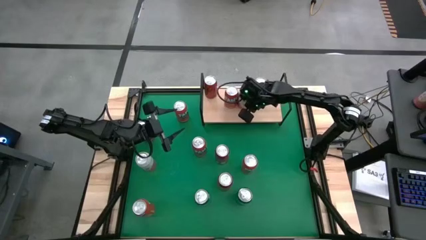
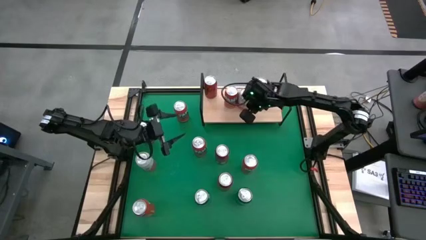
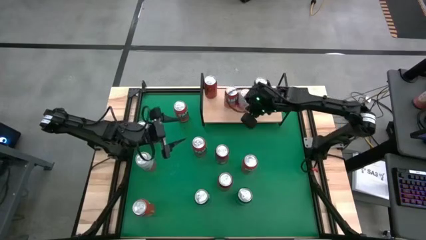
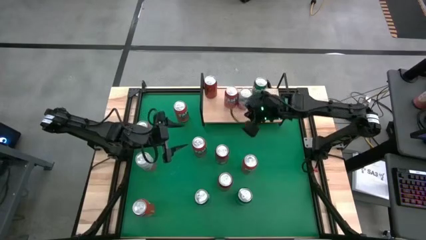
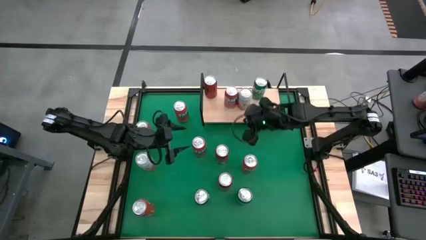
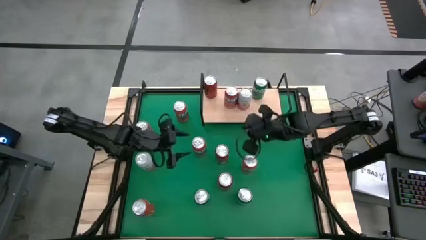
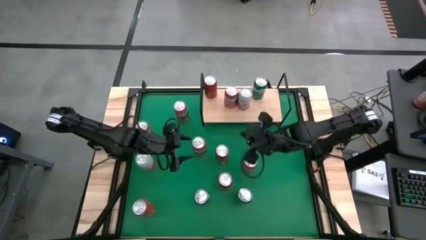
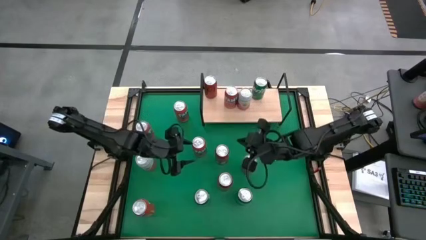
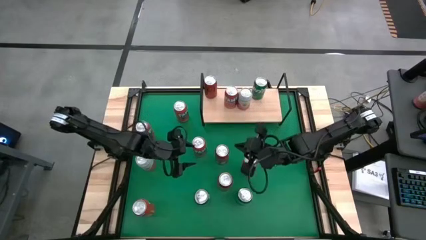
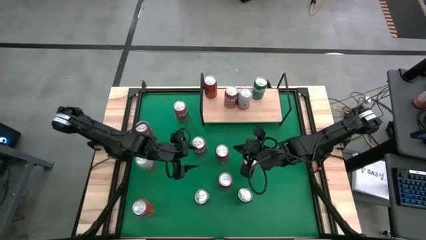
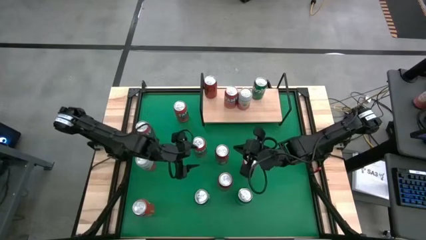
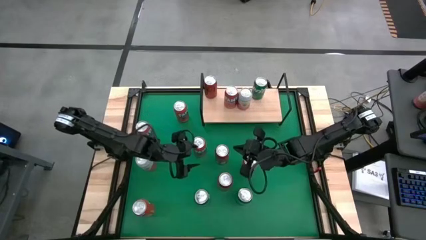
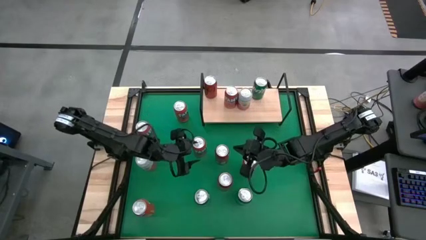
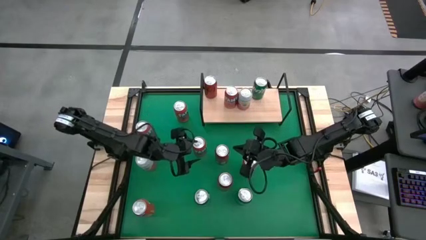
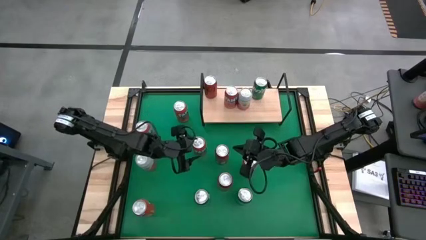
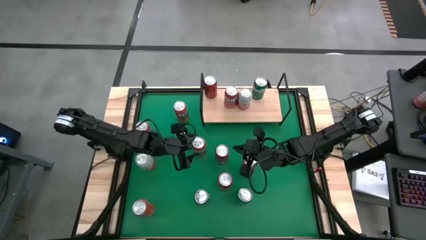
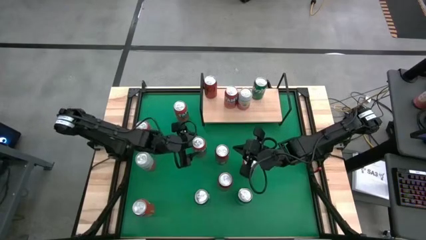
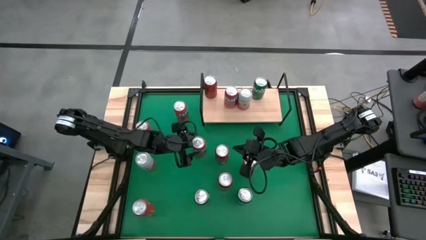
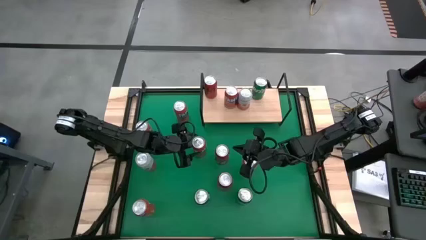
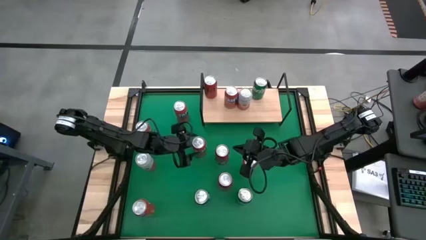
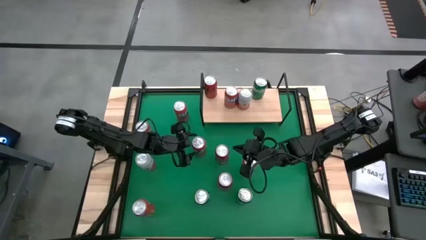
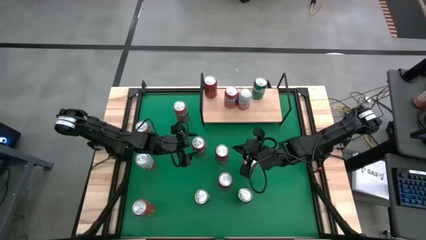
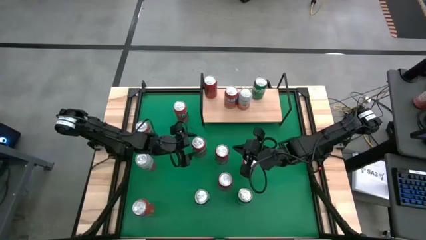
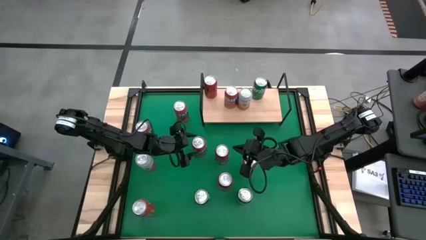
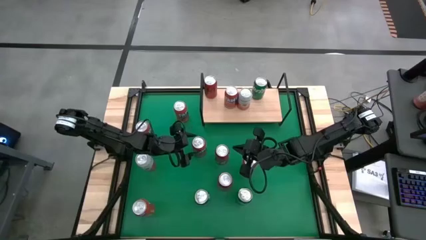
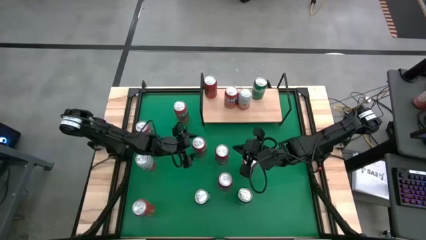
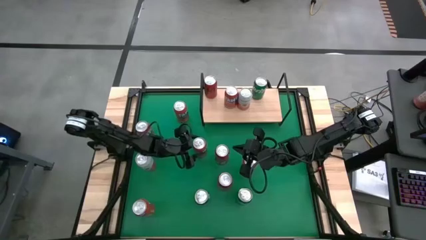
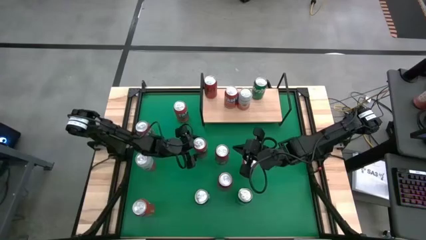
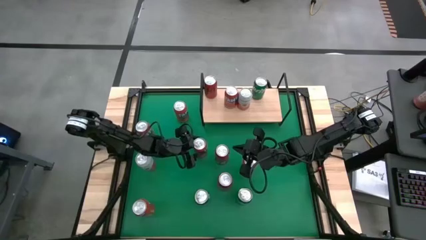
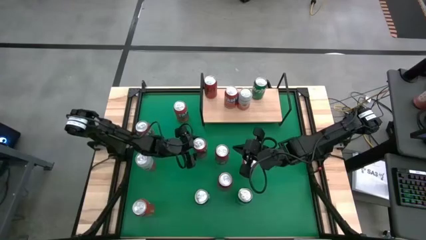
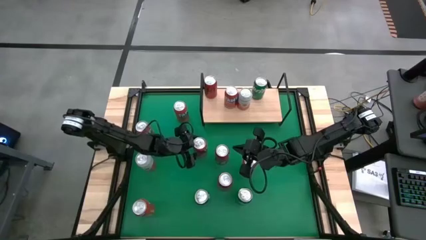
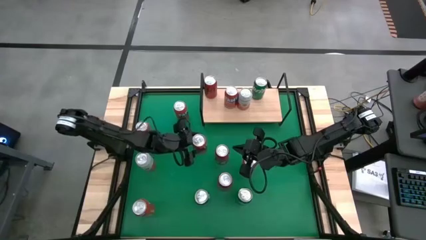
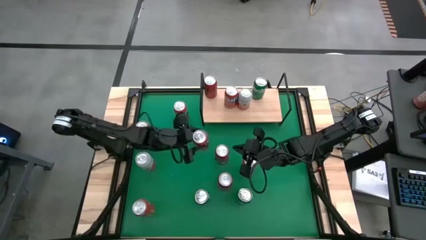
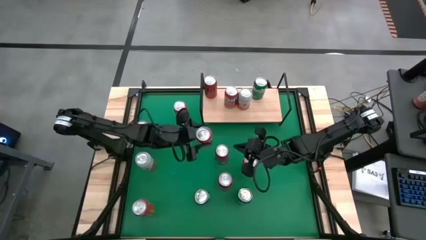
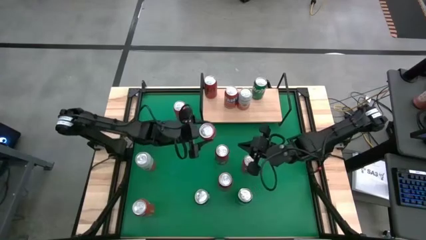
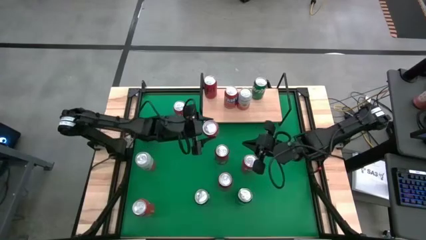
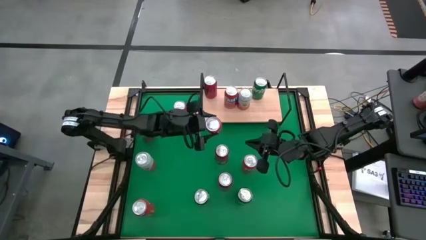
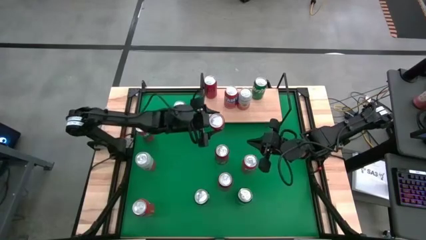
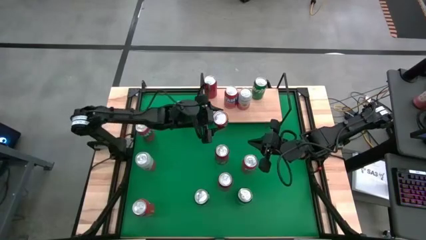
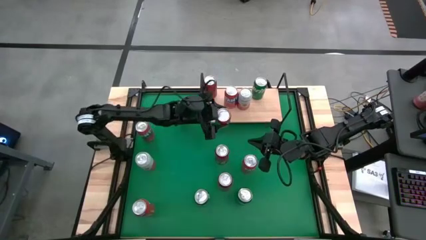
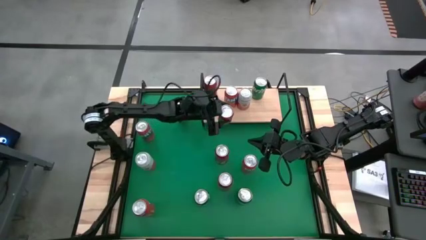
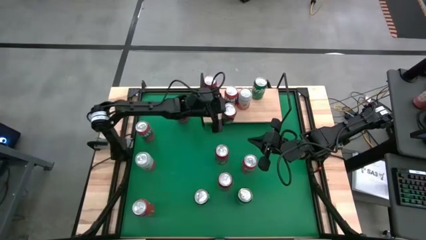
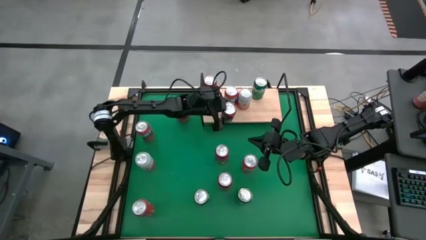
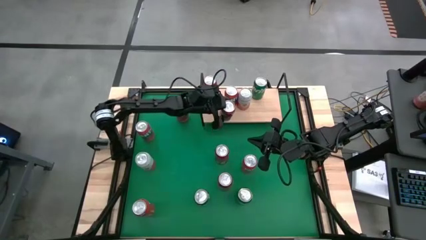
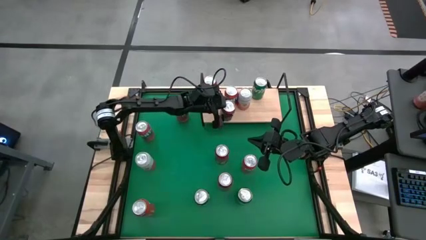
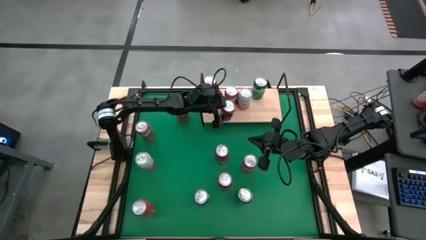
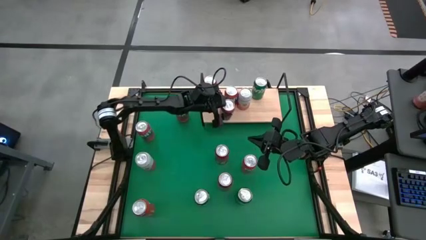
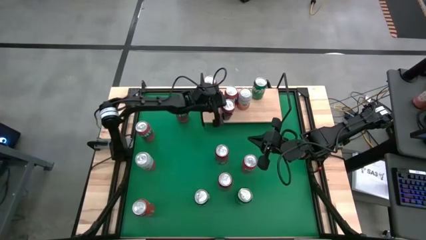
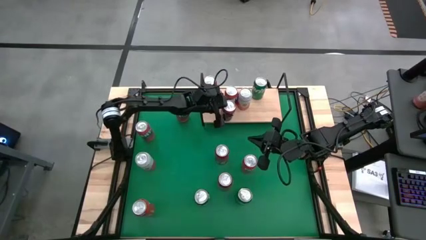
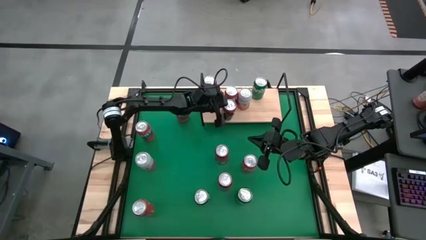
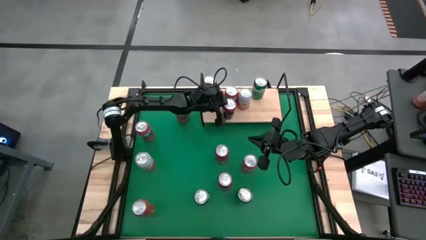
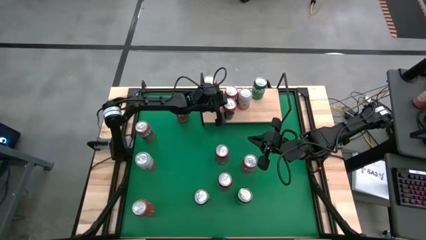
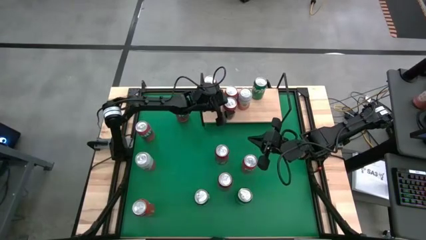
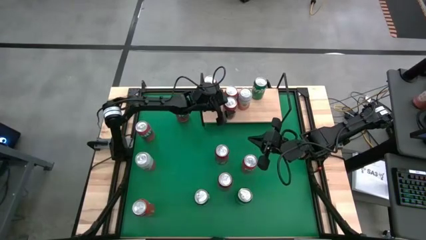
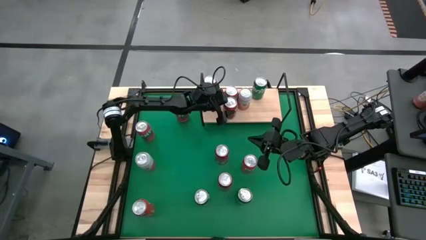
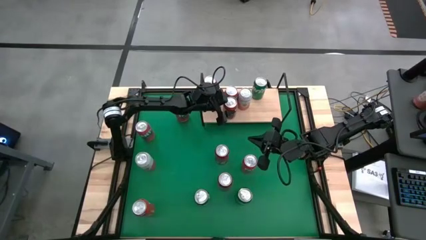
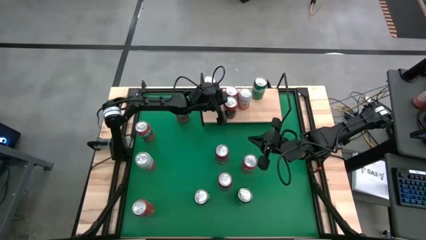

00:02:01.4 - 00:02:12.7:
Task: Place canned beverage on shelf
Put the red soda can on the shelf aligned with the other red soda can

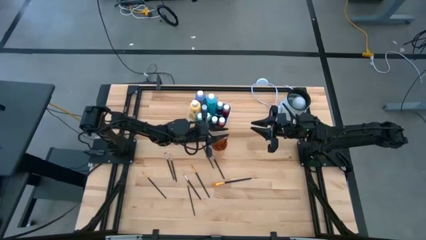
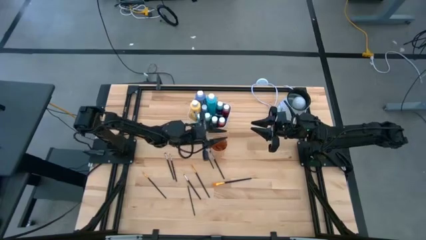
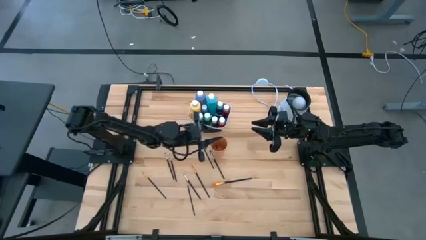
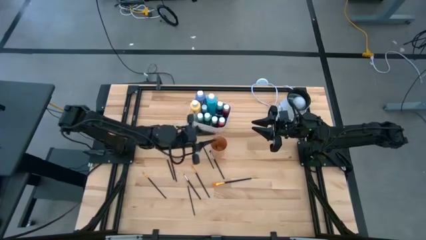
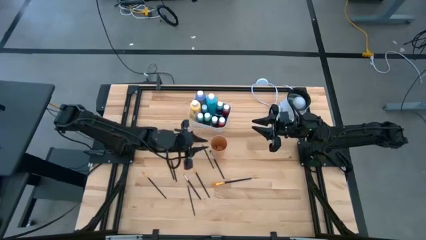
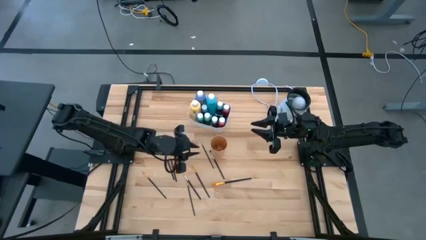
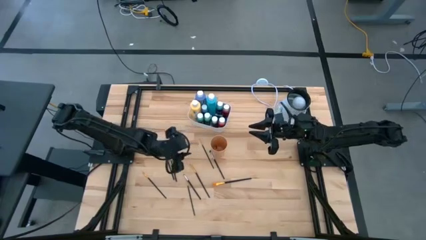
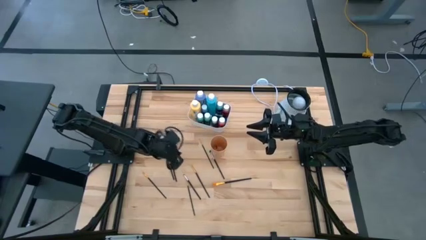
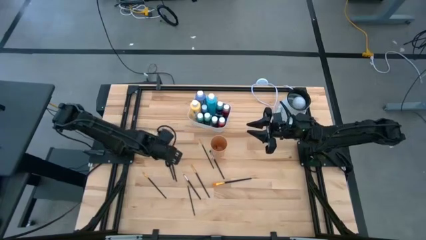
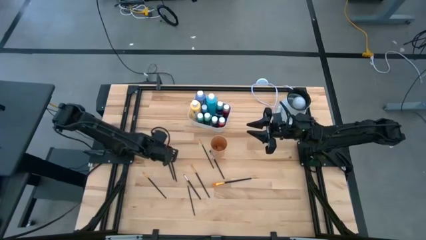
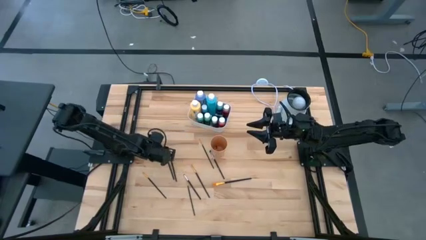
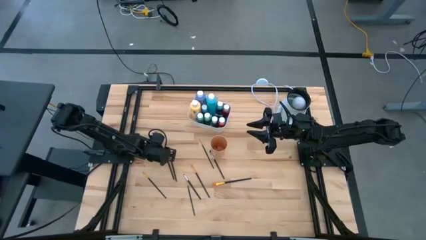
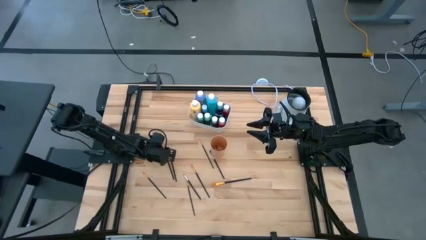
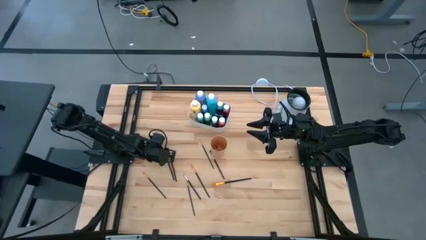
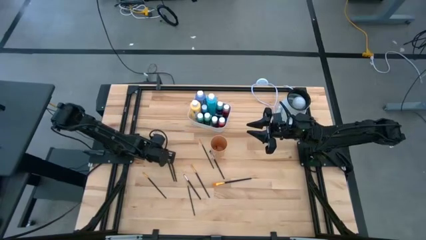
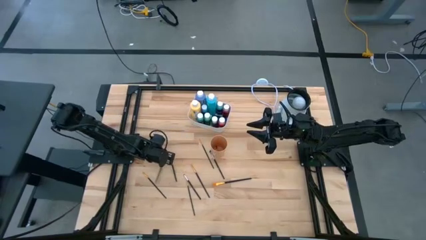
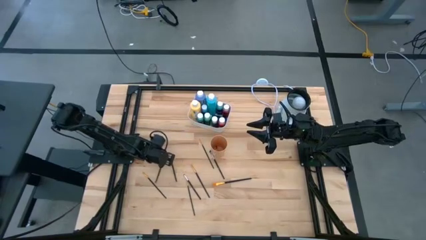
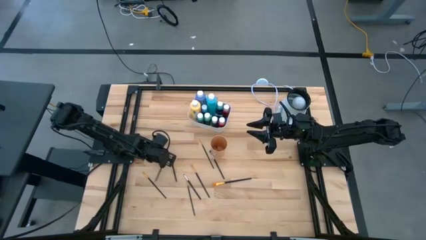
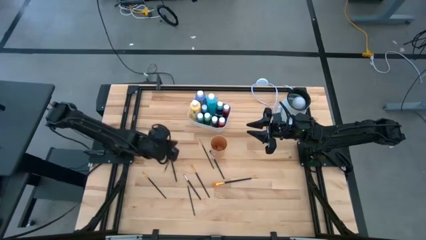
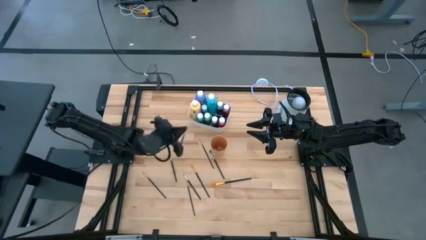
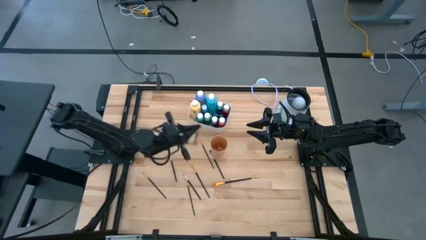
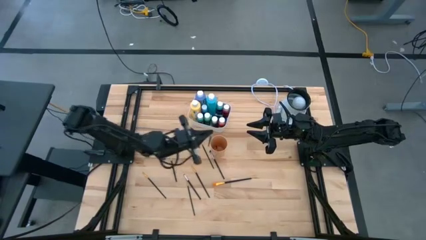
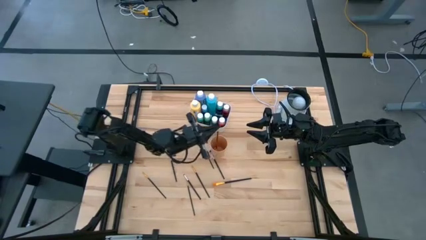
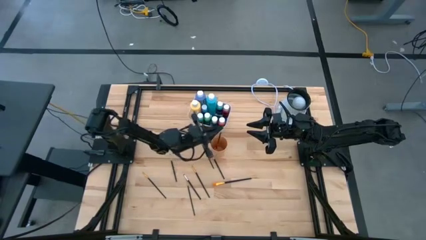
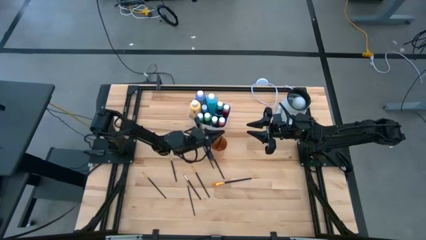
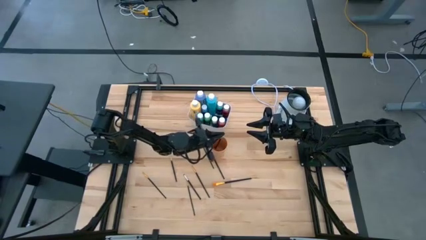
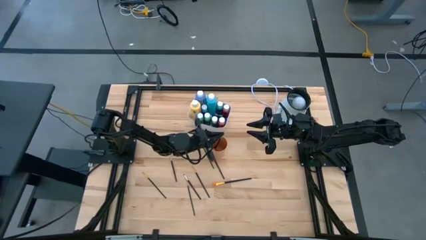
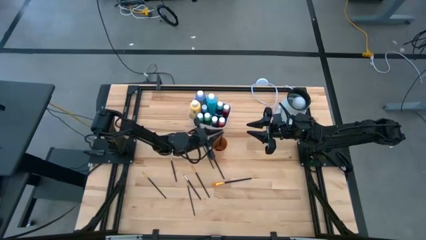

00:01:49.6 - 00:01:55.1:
Task: Pick & Place Paint Supplies
Put the black paint brush into the orange cup
